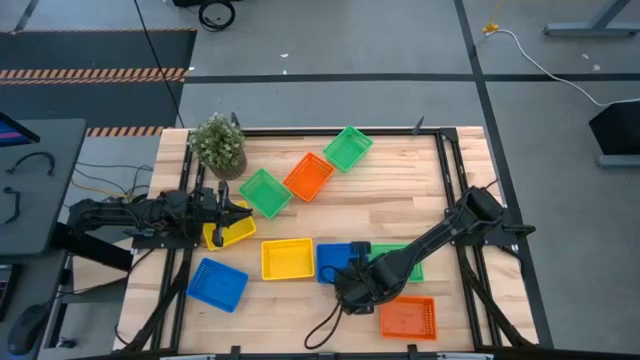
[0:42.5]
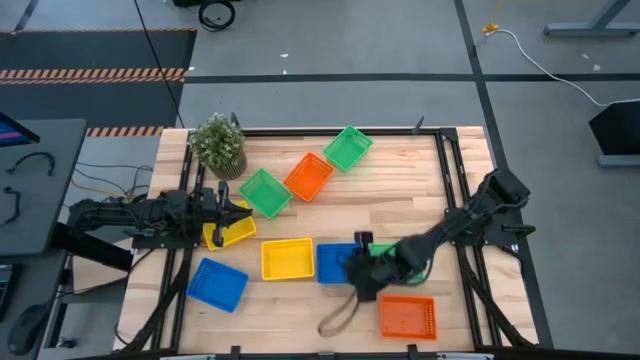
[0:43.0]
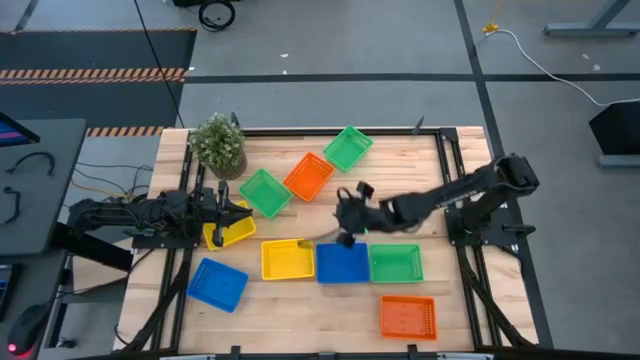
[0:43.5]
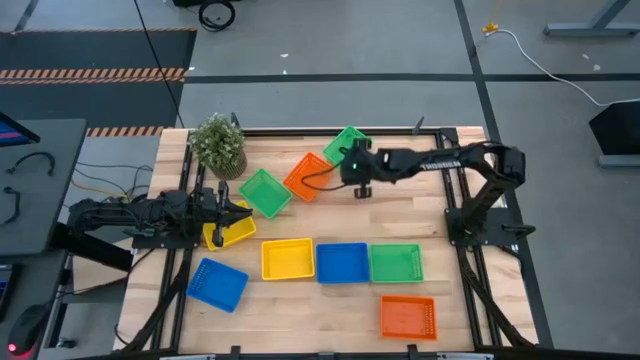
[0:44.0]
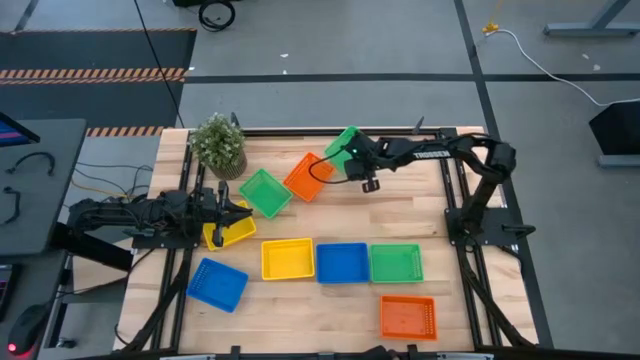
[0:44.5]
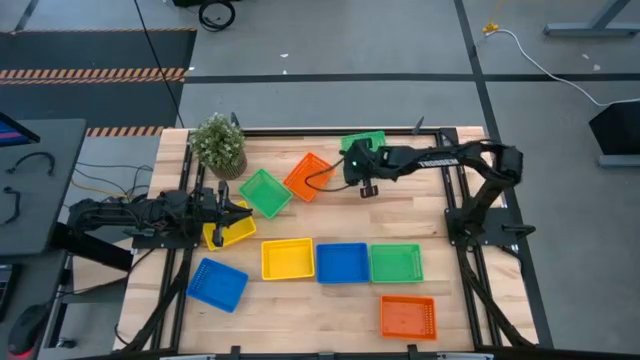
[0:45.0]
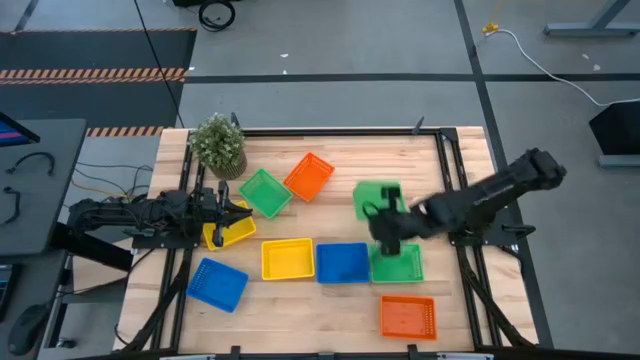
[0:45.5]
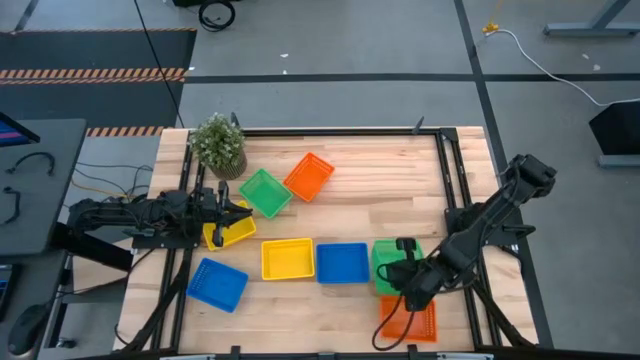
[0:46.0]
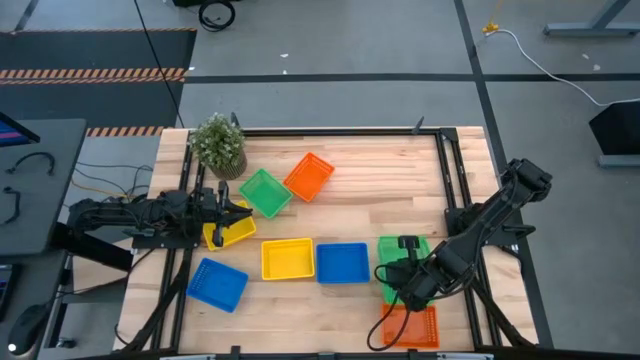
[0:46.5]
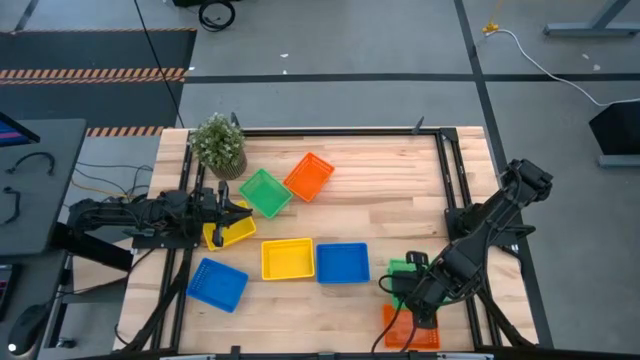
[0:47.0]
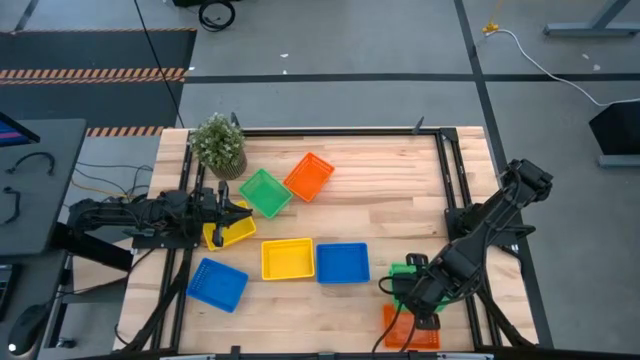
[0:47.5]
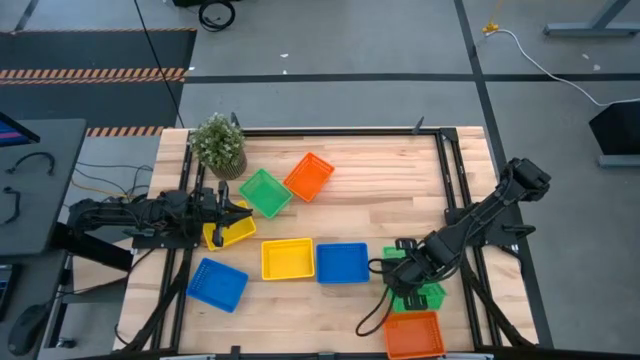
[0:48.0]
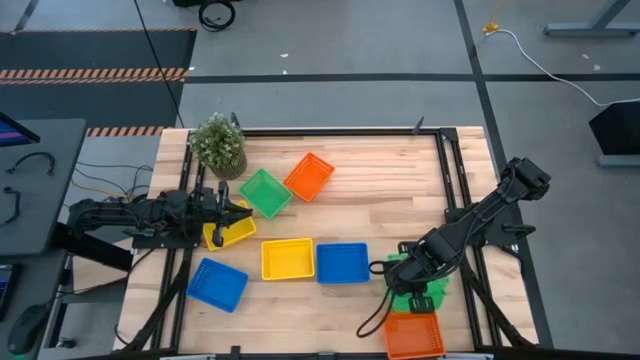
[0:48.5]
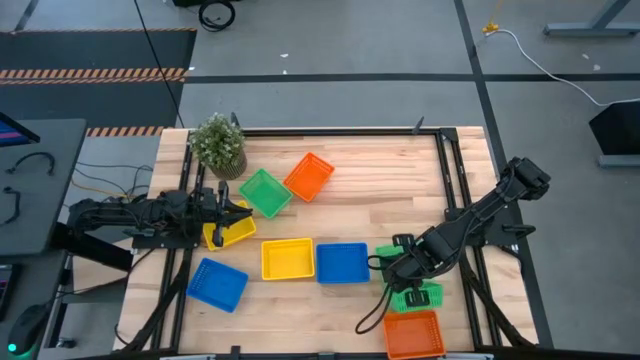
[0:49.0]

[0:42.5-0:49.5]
Stack the top green bin on top of the bottom right green bin

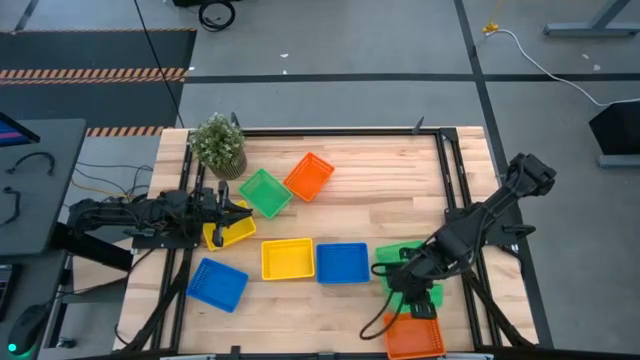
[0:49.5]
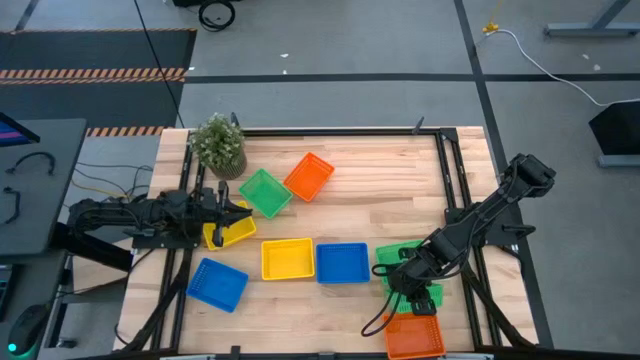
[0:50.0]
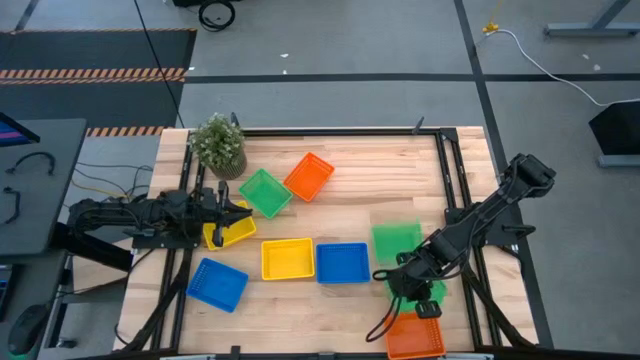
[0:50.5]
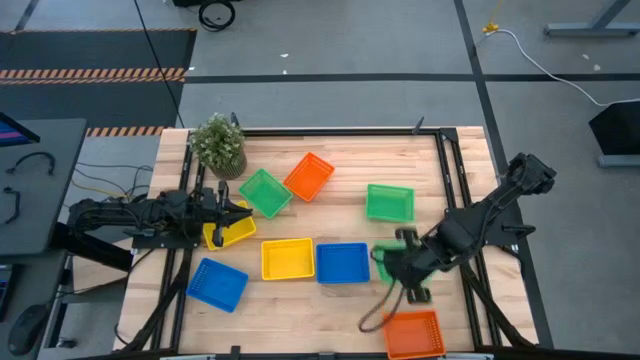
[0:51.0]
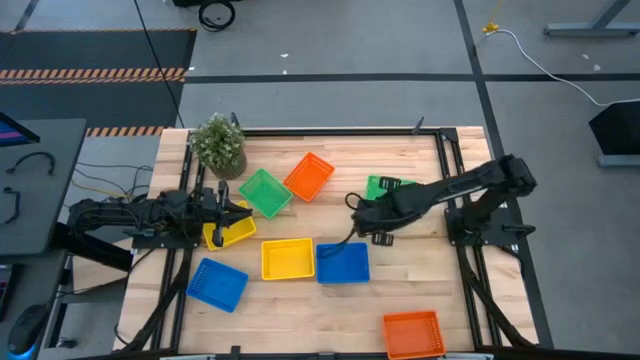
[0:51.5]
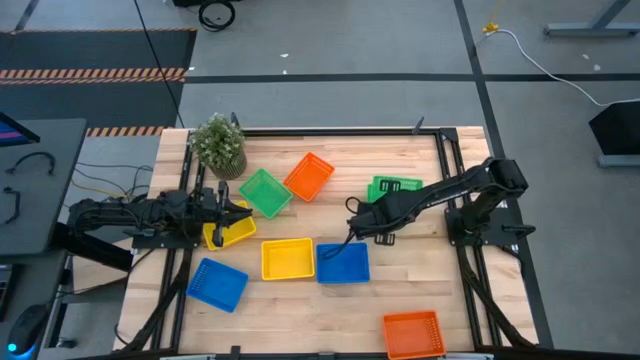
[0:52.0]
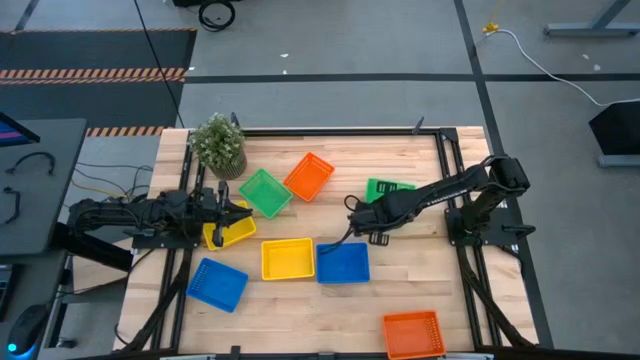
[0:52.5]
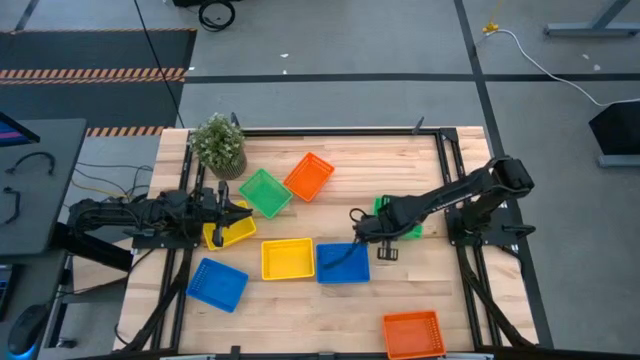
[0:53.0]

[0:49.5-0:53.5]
Stack the bottom green bin on top of the top right green bin

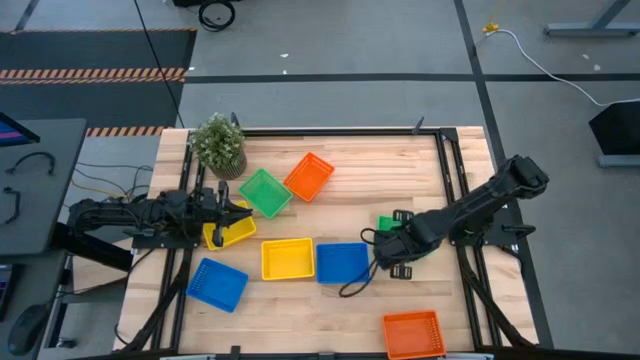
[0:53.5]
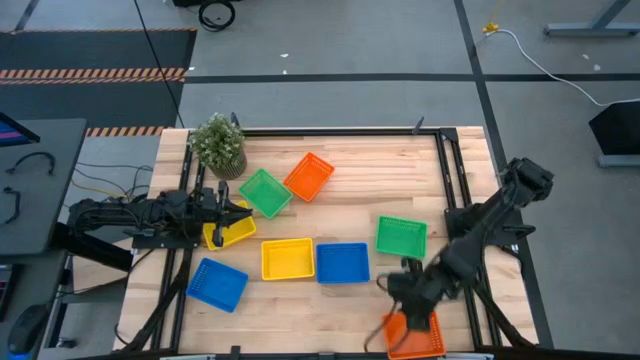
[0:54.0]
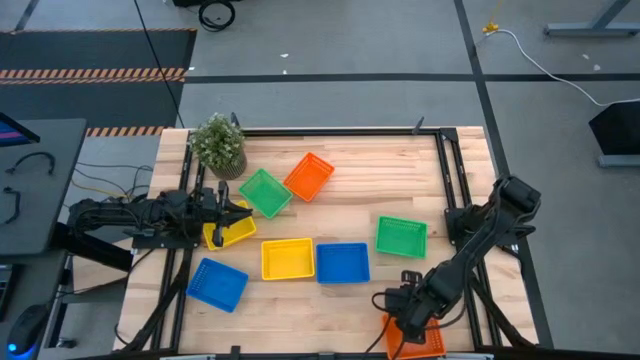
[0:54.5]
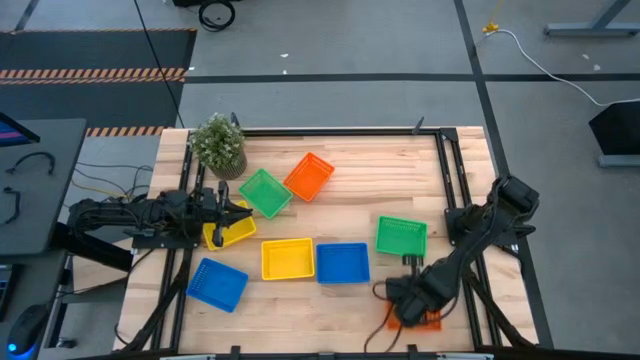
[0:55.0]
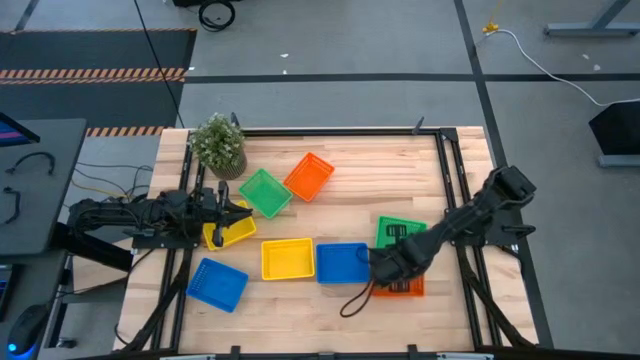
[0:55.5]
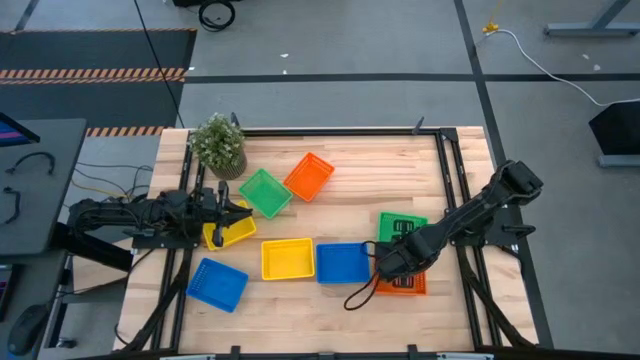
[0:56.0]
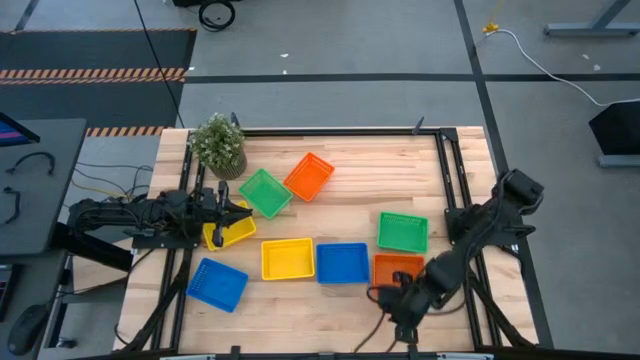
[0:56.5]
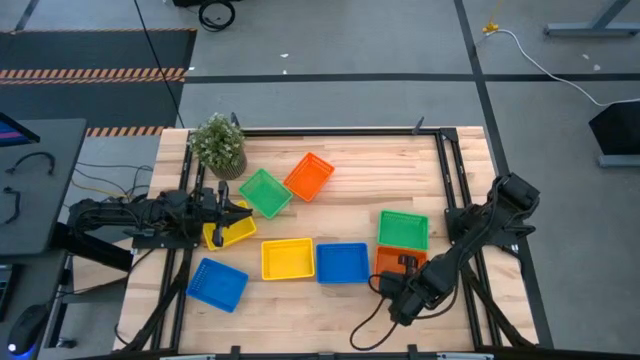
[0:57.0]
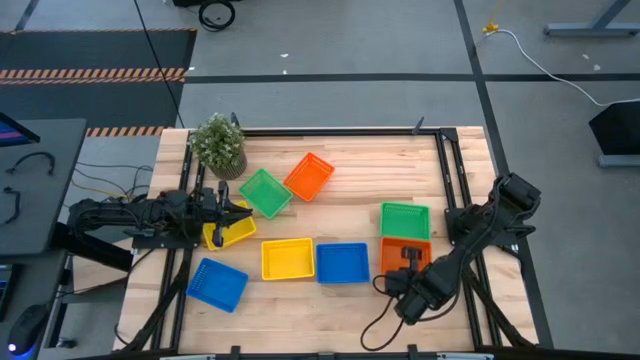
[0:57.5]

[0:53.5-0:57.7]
Move the bottom orange bins to the right of the right blue bins

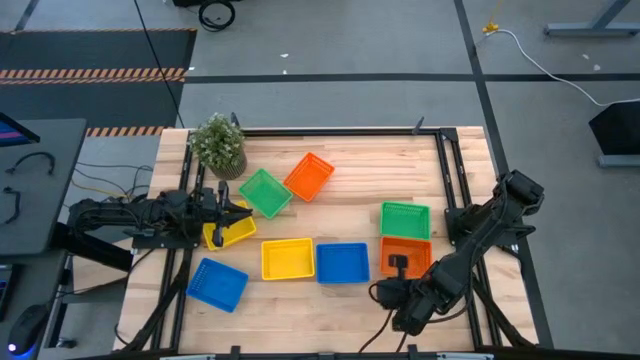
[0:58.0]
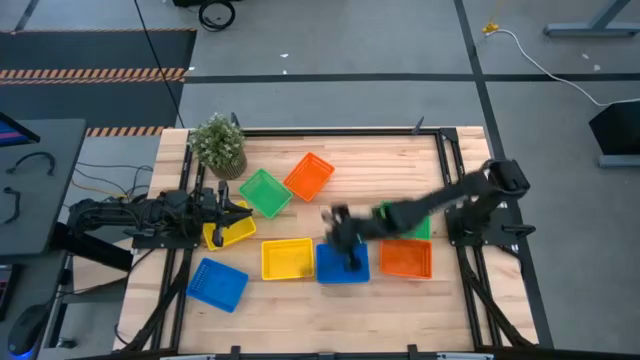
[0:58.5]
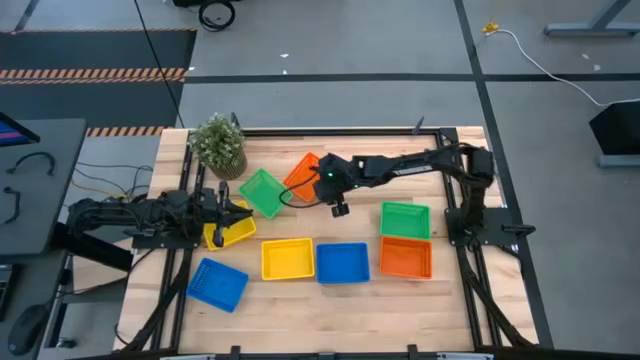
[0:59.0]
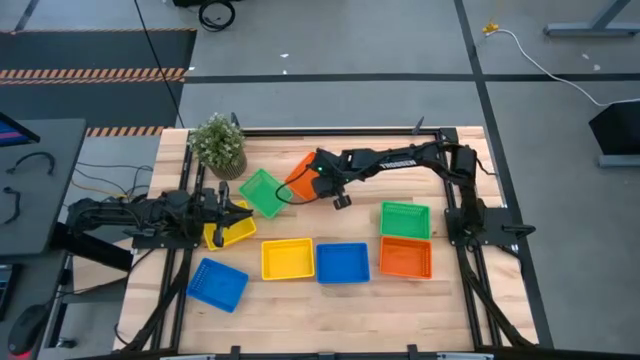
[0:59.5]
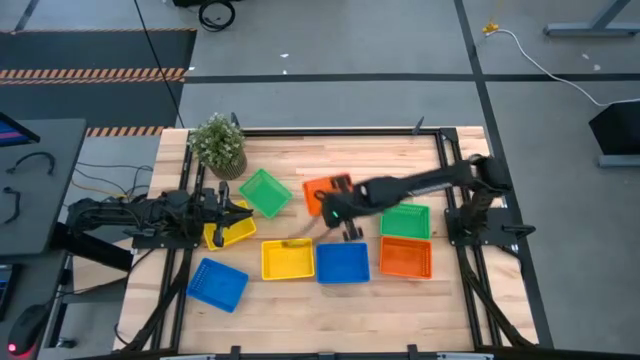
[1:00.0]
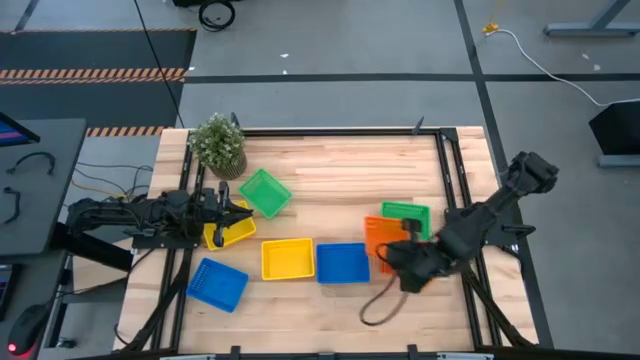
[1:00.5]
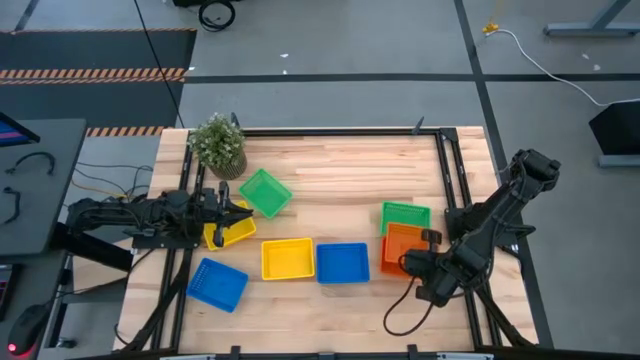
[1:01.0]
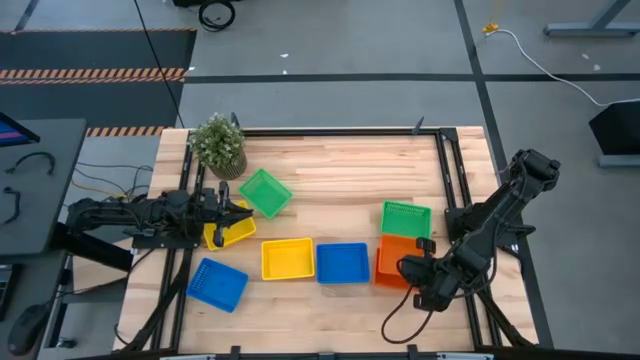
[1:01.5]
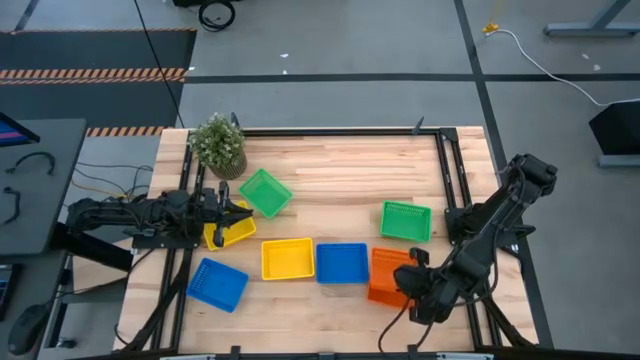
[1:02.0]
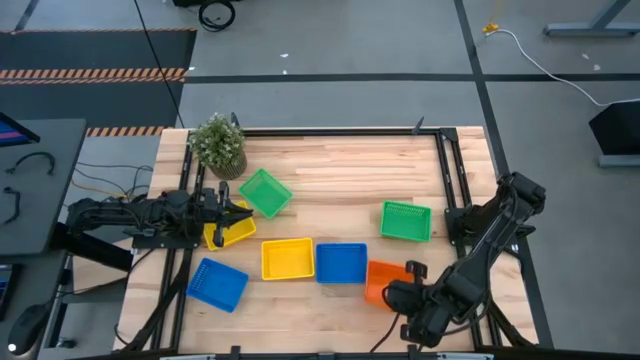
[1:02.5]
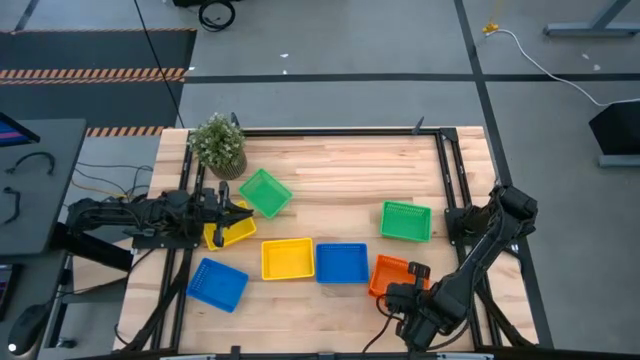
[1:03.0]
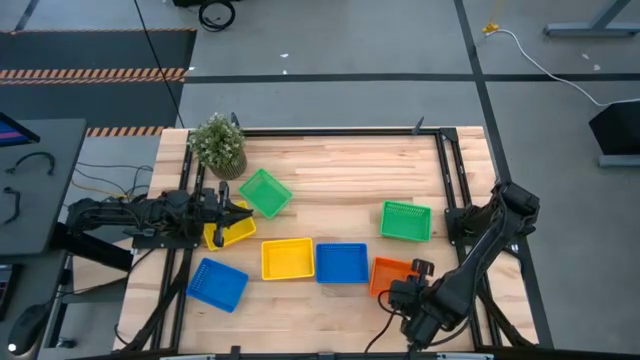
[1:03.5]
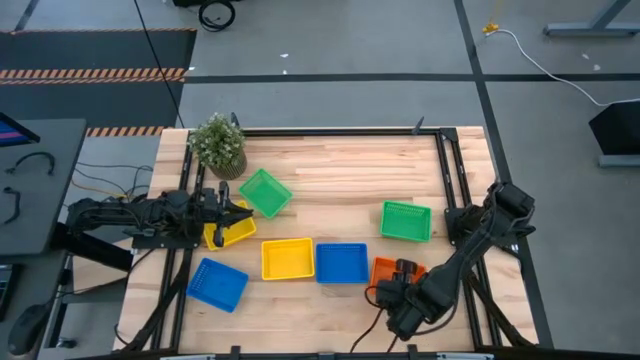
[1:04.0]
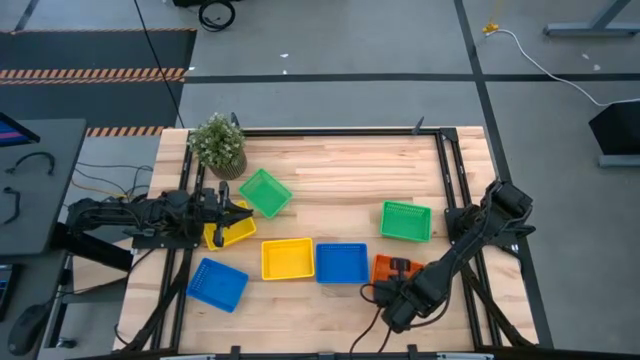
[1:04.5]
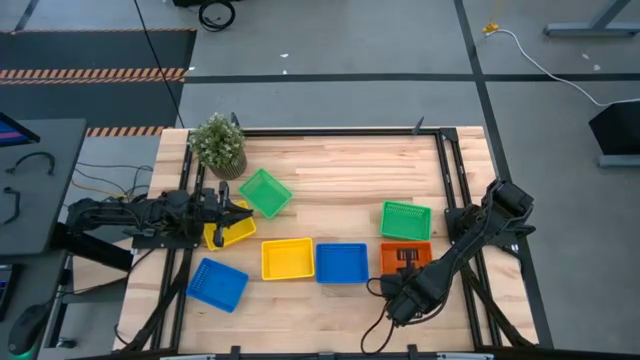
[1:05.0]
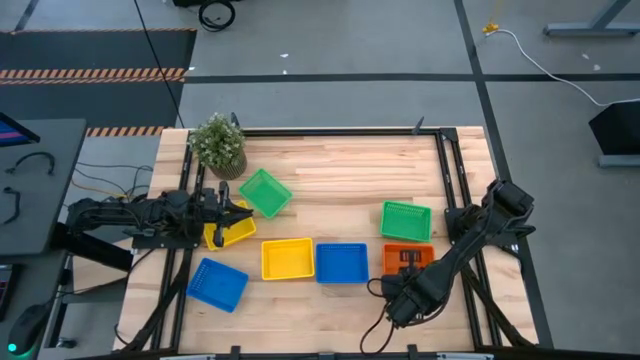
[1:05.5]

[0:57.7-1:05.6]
Stack the top orange bin on top of the bottom orange bins
